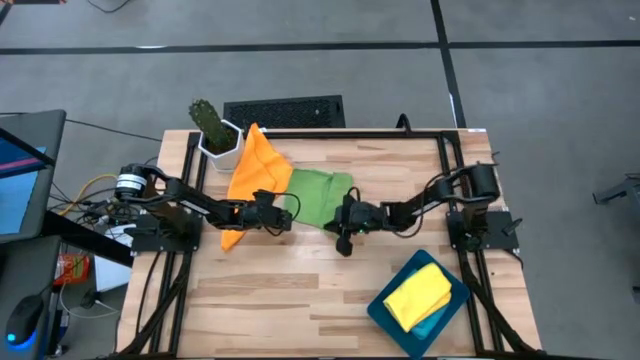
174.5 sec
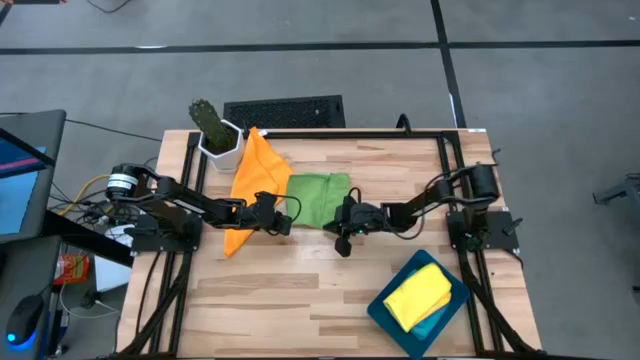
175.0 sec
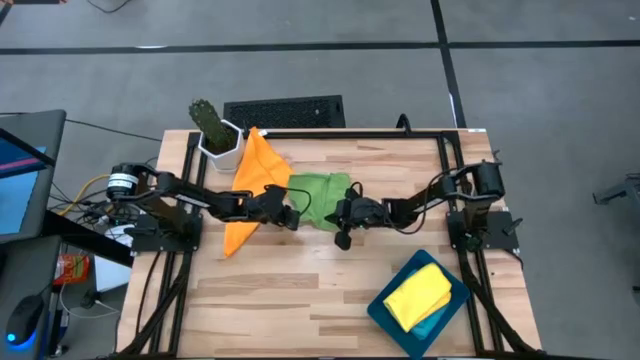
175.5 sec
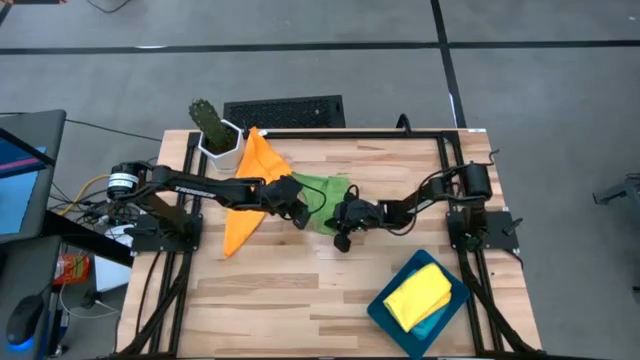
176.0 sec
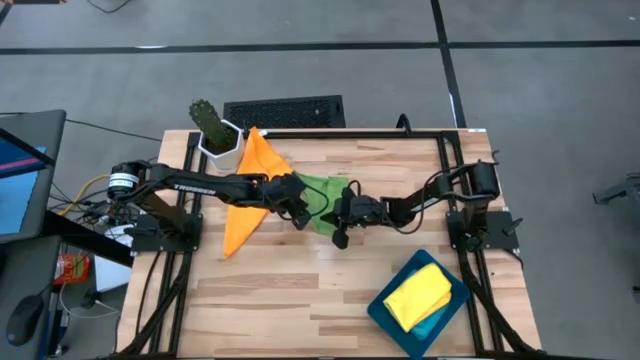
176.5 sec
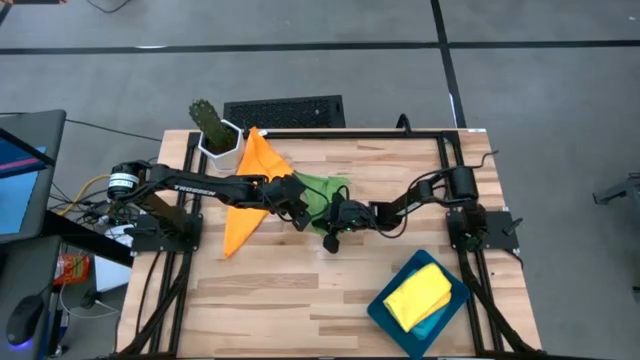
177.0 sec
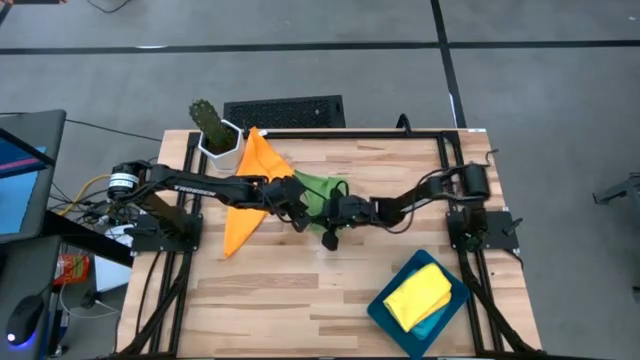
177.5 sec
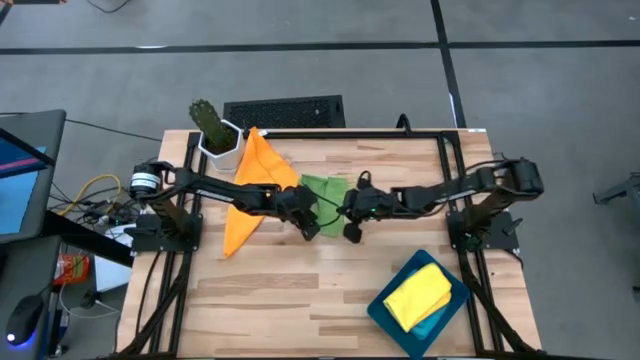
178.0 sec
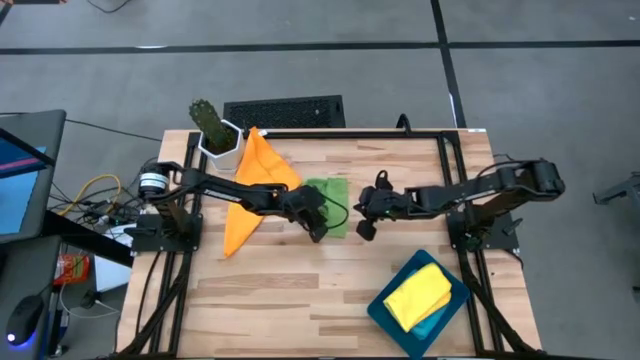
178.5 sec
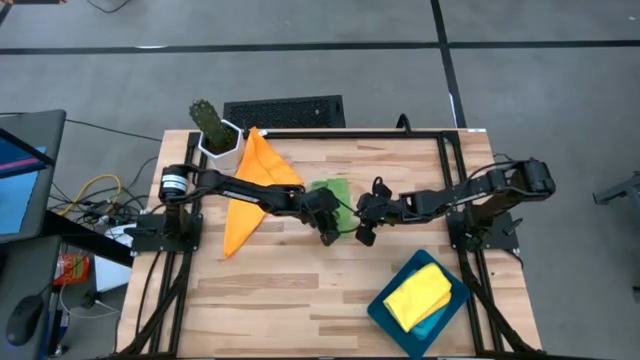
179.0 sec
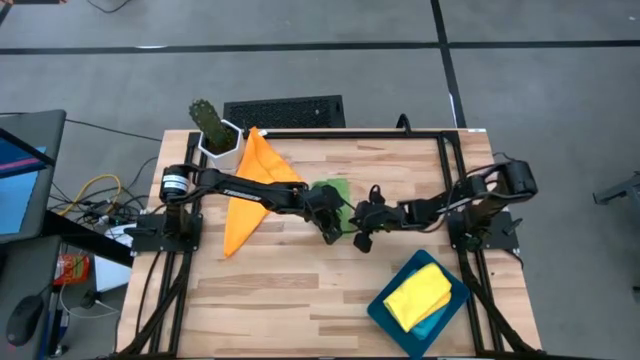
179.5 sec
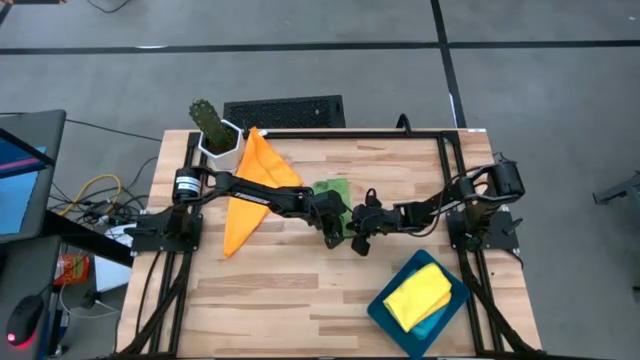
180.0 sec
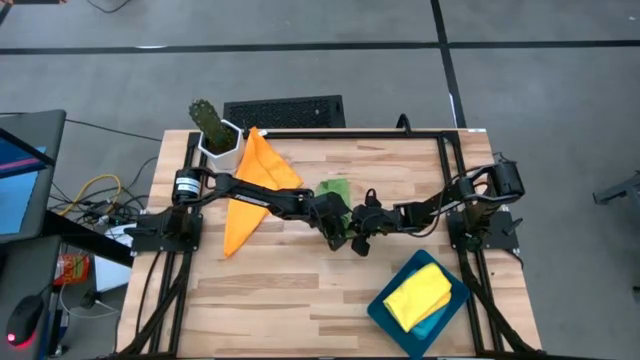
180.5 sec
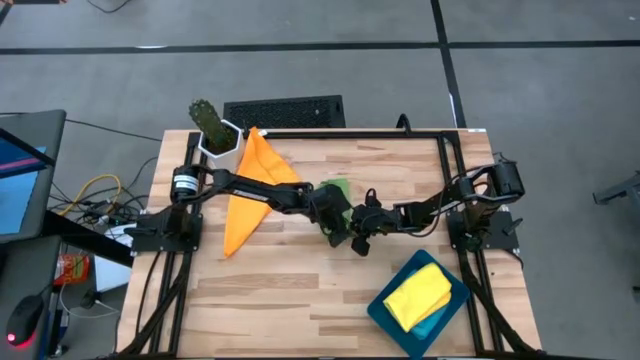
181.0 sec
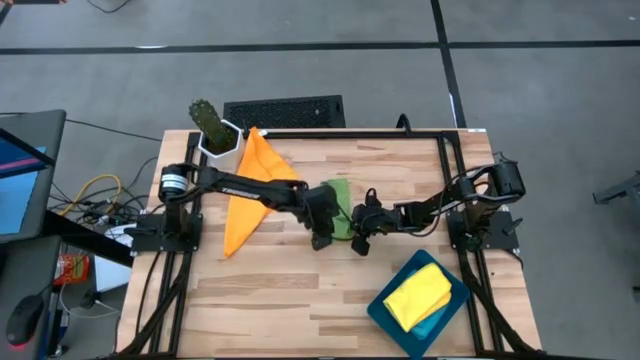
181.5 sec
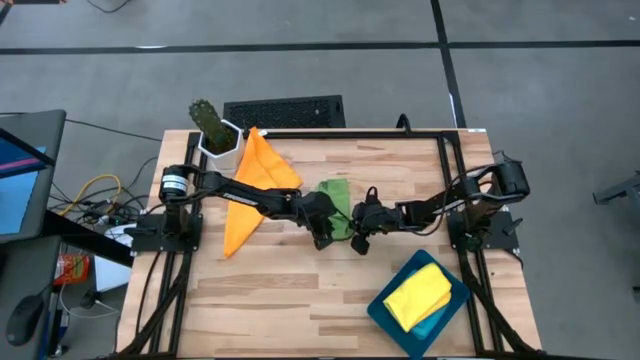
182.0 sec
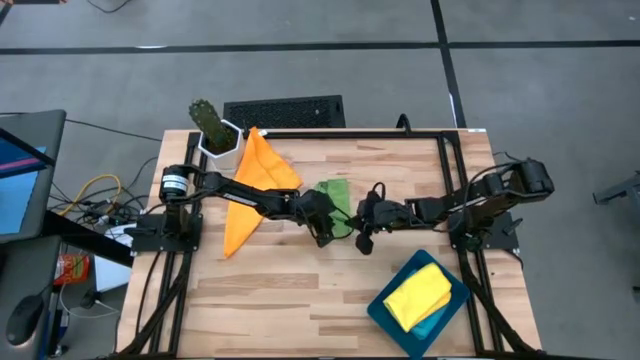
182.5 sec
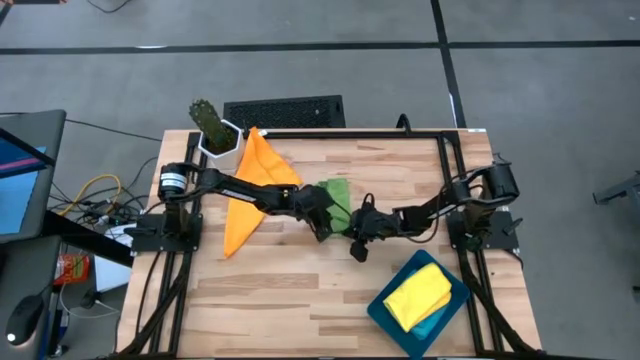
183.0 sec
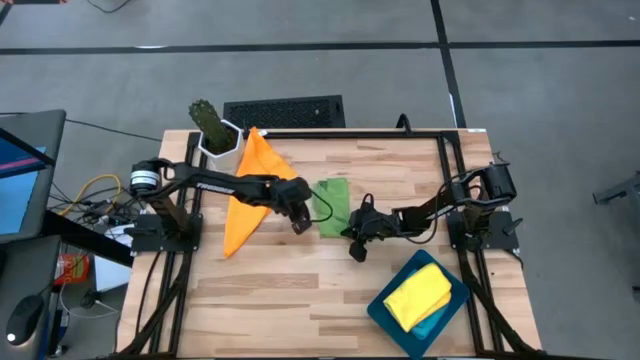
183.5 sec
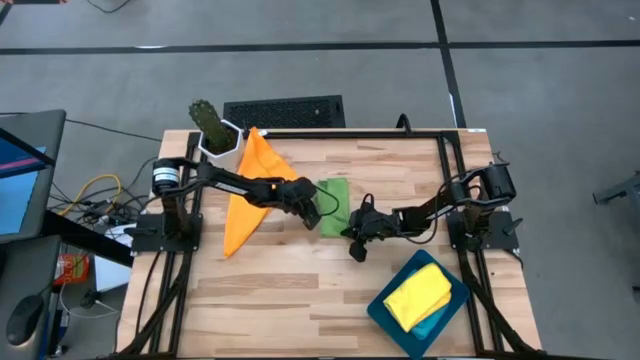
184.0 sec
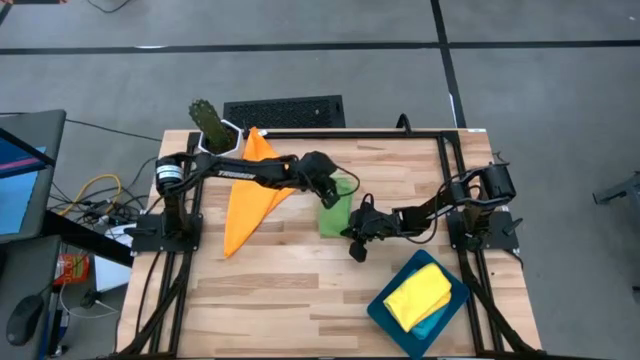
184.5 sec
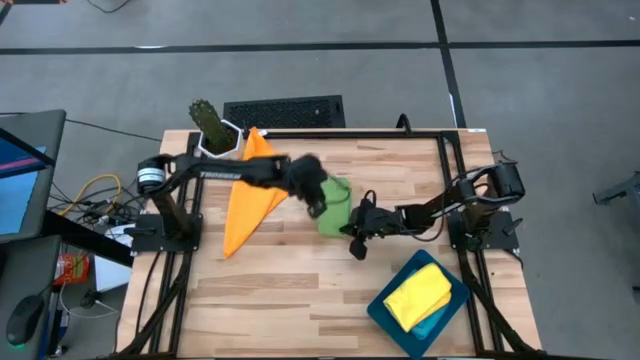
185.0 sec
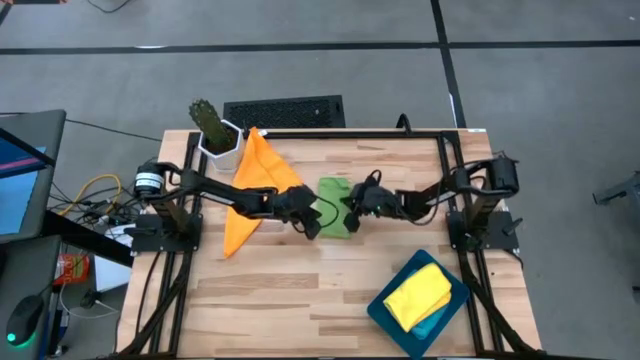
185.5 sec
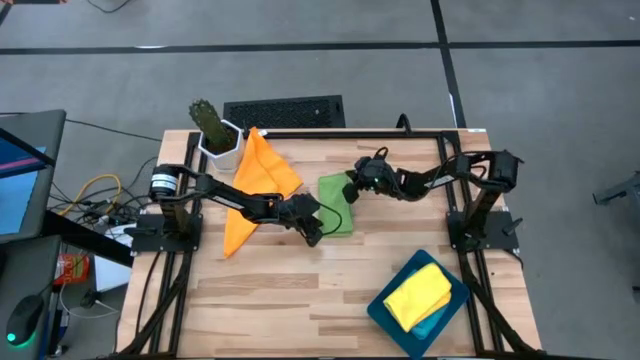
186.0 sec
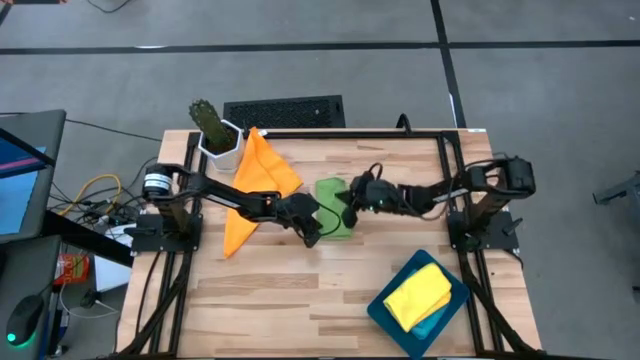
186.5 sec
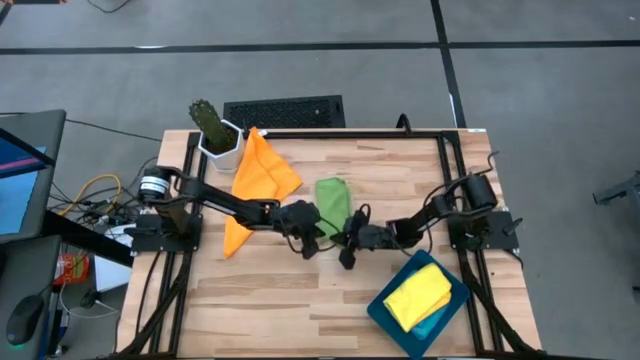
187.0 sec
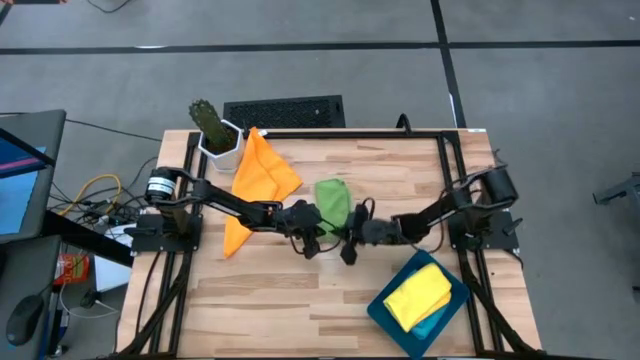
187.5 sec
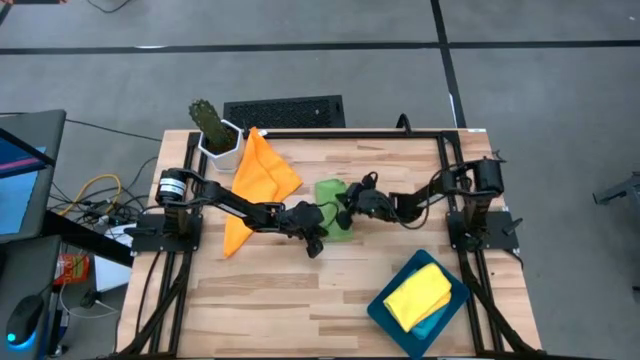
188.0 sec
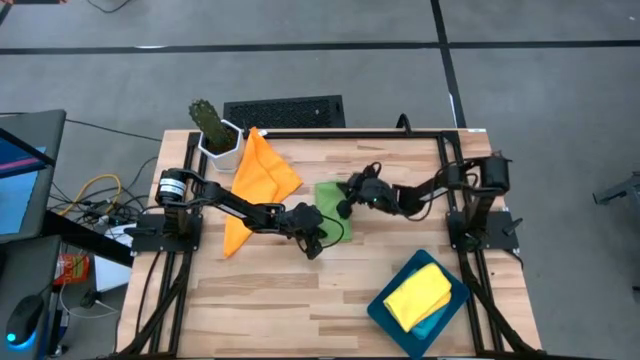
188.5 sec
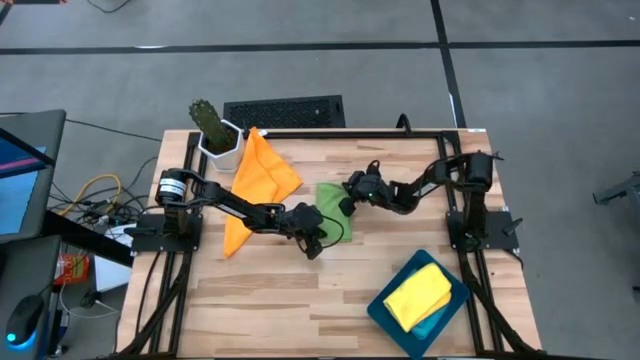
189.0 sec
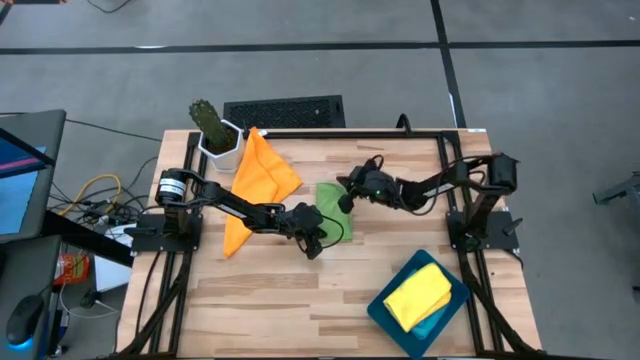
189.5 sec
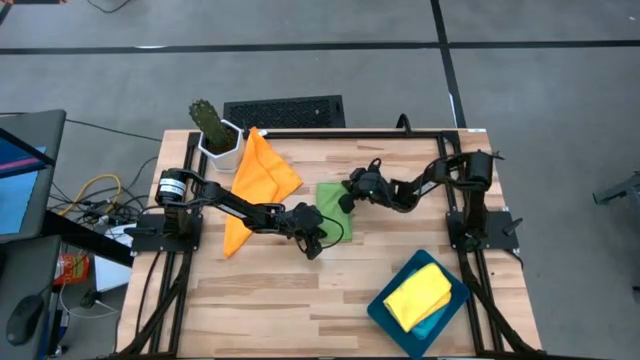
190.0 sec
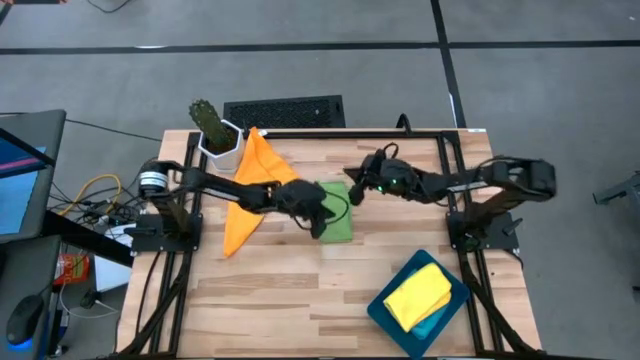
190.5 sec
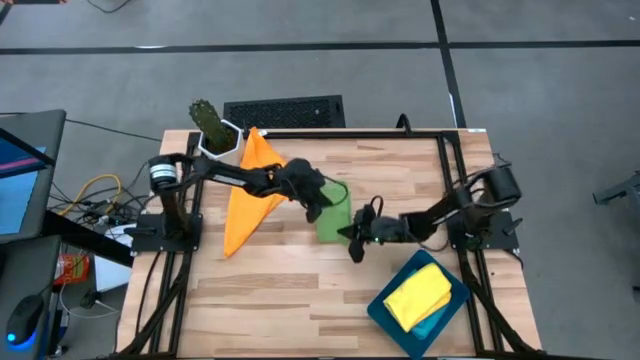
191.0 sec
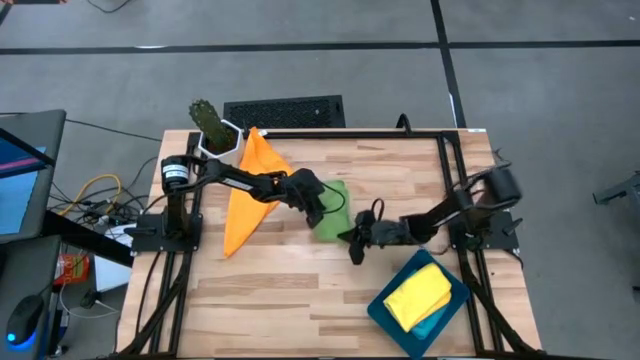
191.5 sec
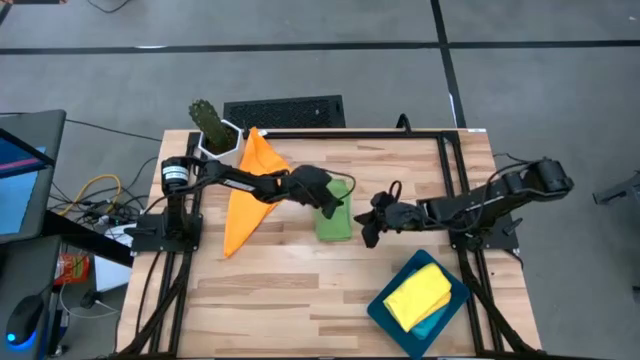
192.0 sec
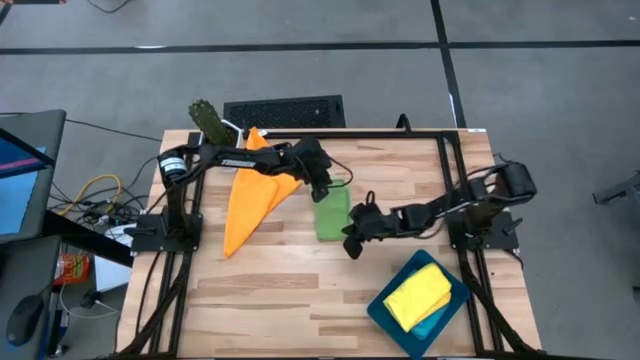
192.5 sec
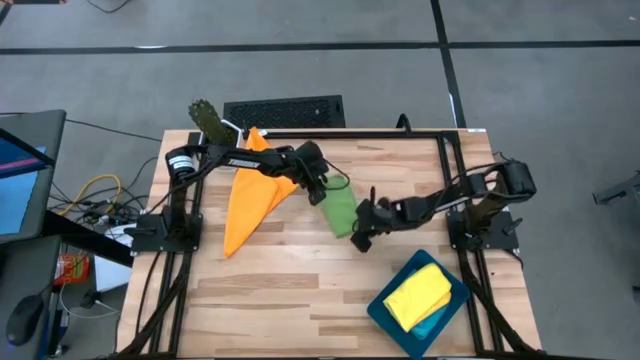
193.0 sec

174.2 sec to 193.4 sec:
Task: Fold microfiber towels
Fold the green microfiber towel

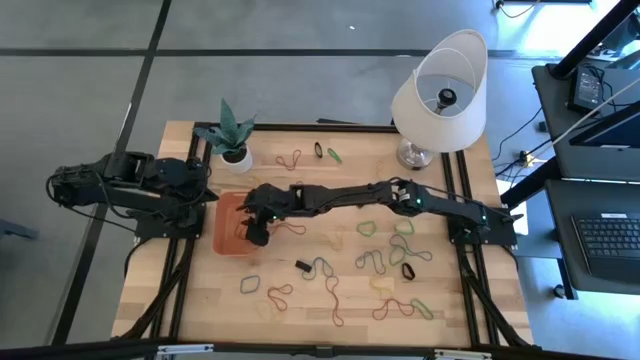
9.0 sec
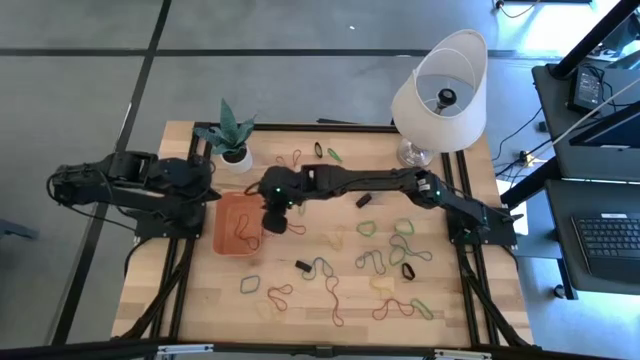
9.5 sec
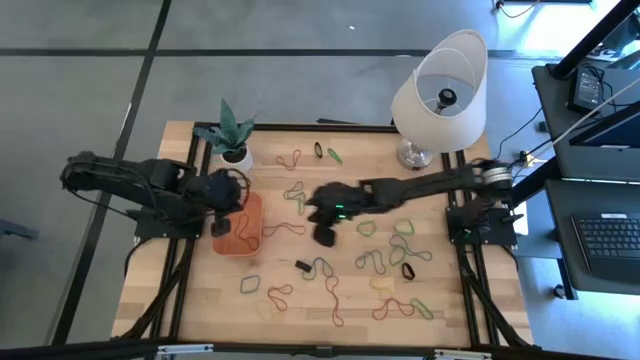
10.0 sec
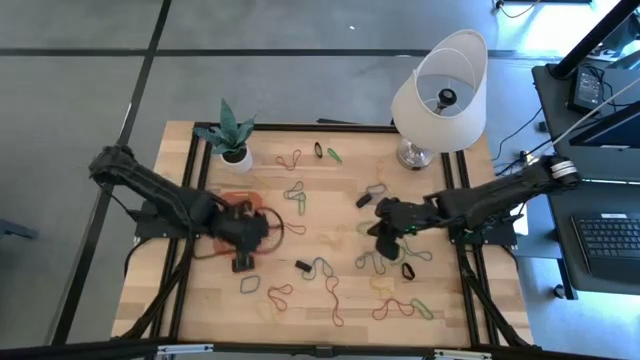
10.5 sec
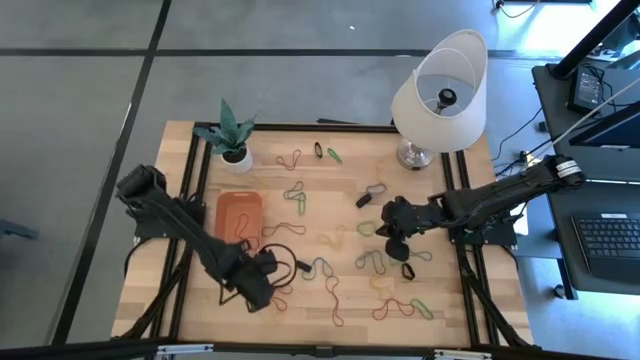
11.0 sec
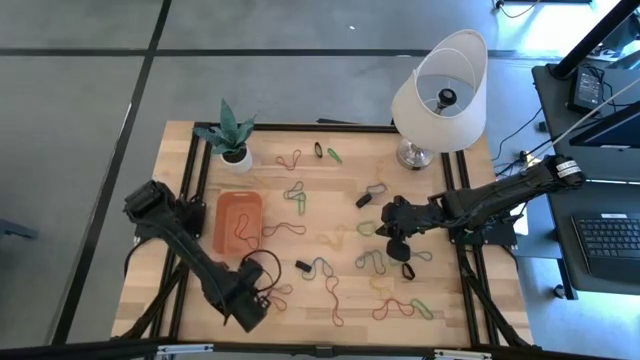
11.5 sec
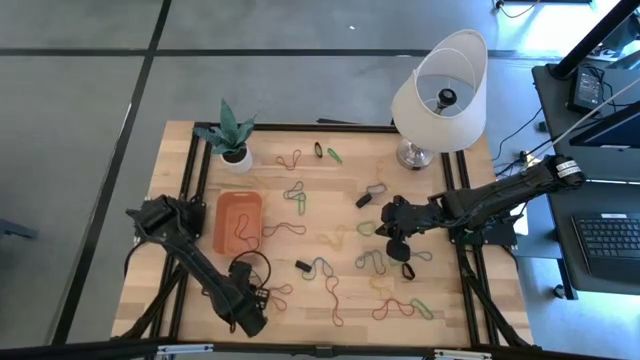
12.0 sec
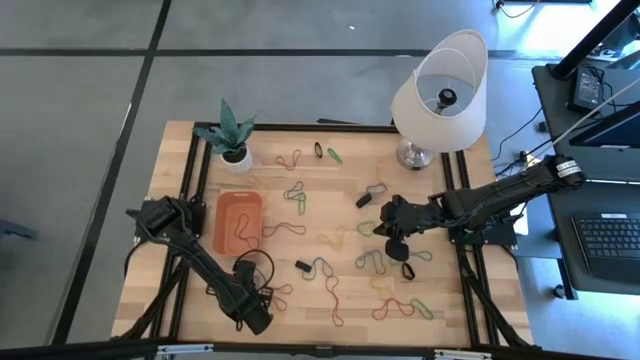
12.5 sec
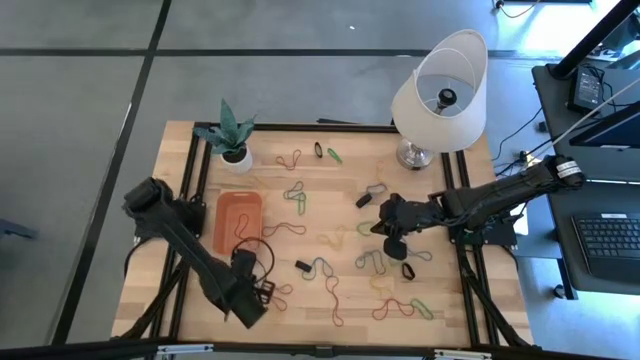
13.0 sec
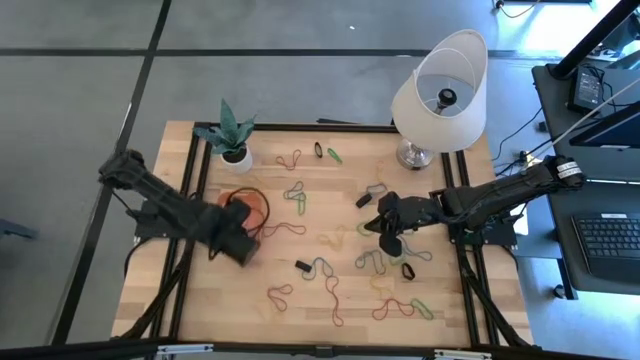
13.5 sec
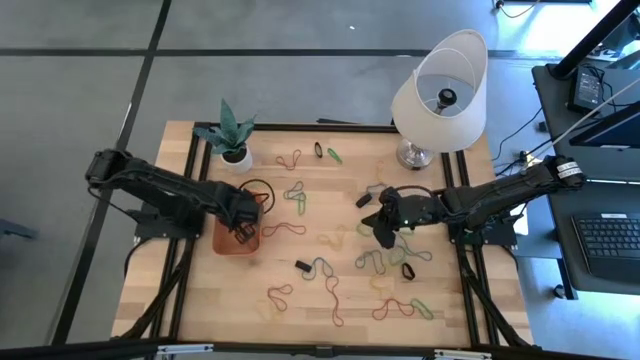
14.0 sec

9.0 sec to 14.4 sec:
Task: Pick and place rubber bands into bin
Put the blue rubber band into the orange bin
